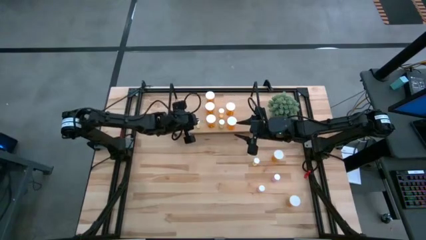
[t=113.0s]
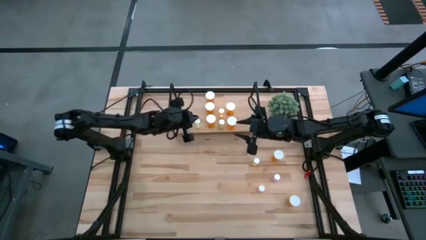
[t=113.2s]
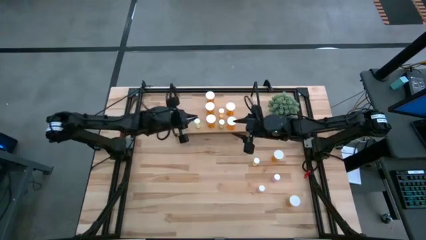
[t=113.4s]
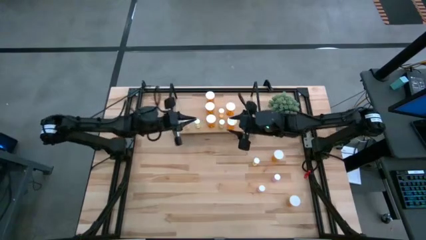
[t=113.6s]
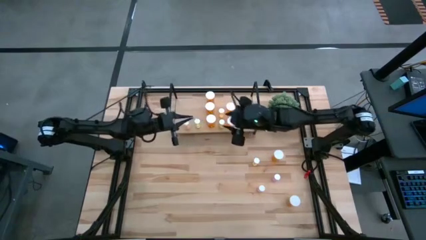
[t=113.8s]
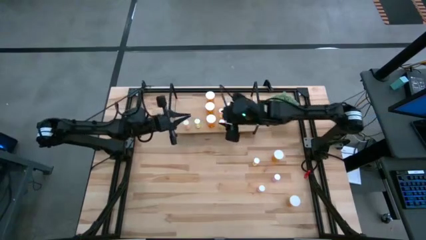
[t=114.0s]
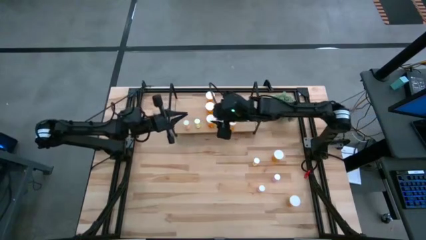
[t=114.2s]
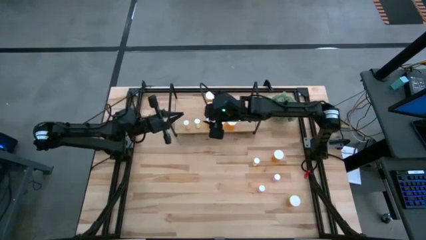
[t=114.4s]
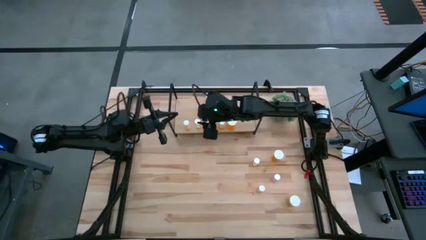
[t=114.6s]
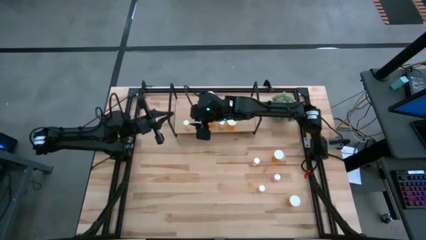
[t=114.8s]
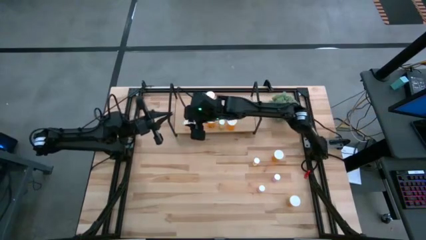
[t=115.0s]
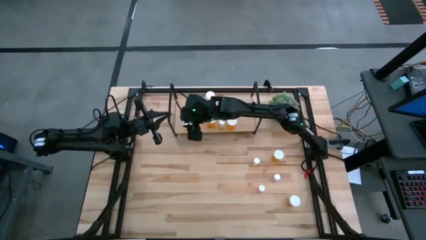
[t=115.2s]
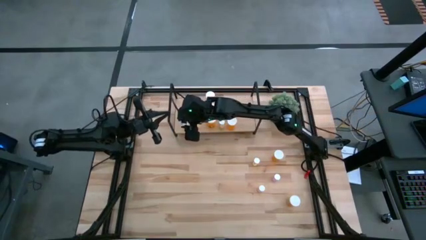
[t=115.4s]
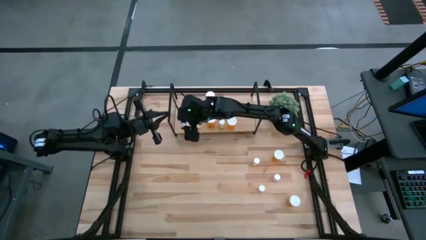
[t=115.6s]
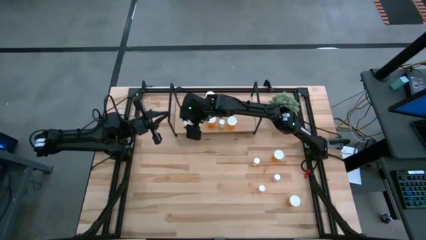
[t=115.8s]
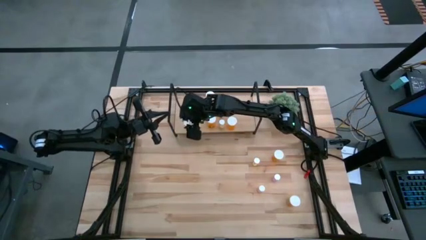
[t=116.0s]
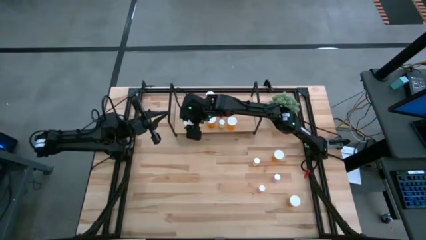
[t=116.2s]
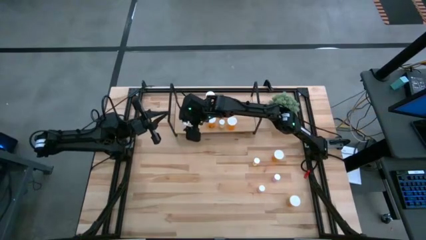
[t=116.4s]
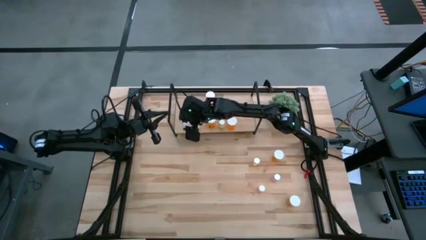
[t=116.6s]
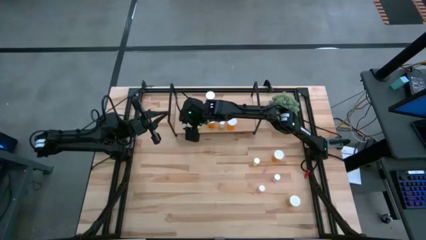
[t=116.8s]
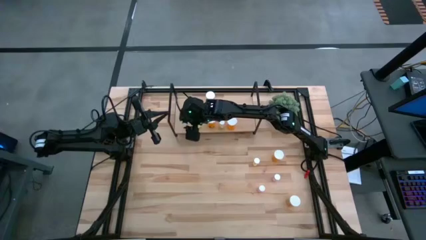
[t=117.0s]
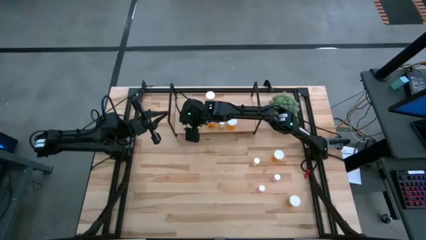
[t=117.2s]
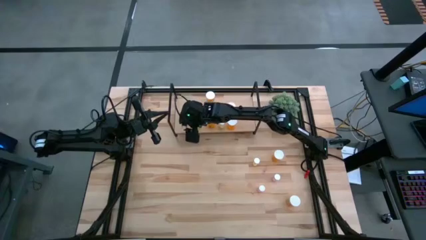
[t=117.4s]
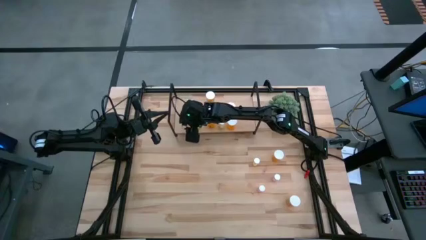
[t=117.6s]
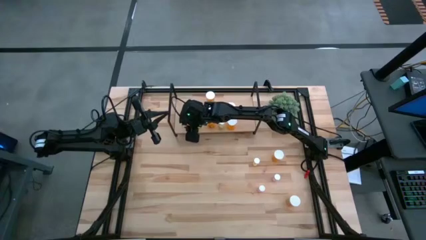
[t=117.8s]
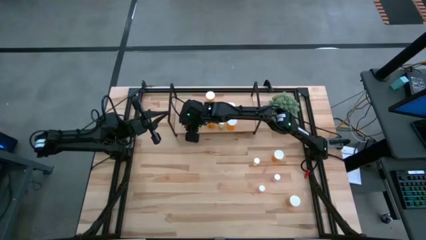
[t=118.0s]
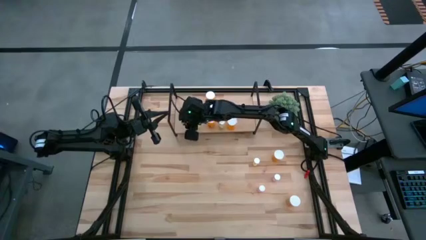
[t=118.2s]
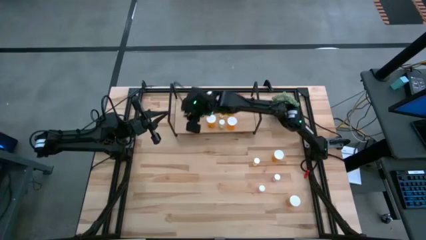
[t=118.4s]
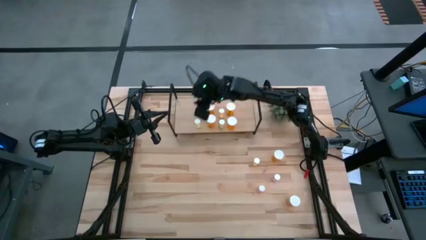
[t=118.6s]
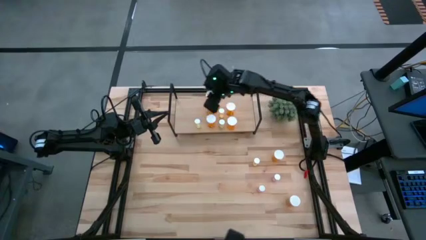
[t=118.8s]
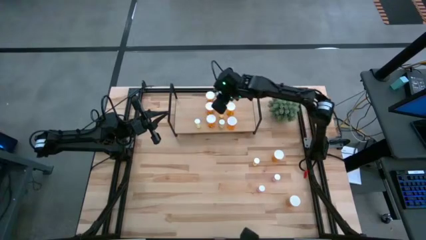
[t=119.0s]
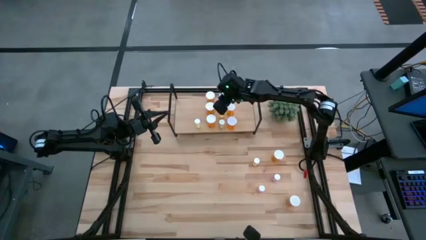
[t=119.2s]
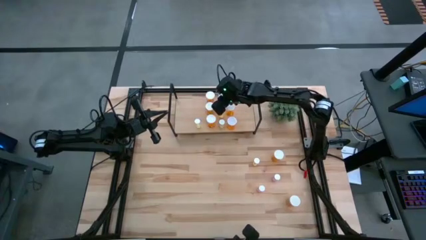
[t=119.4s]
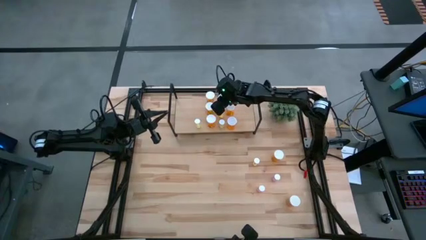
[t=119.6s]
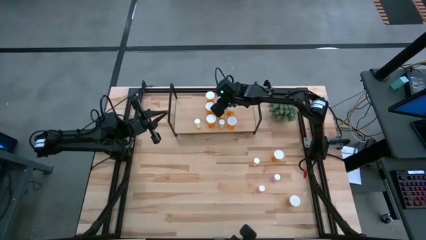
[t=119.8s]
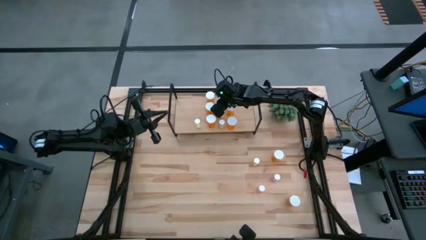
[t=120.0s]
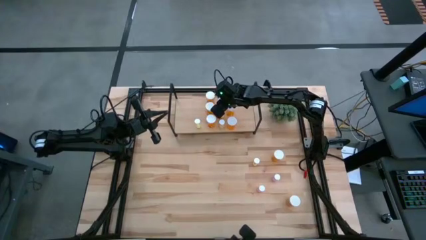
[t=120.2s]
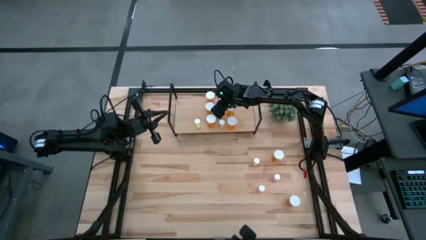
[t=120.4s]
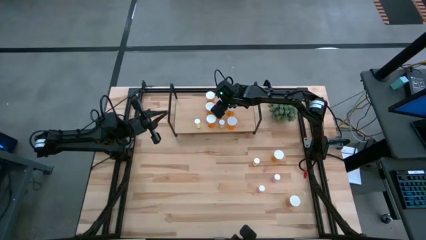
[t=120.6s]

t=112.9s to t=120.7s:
Task: Pick and place medicine bottles onto shelf by color
Move the small yellow pill bottle to the top center on the shelf

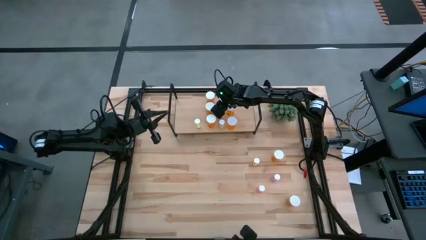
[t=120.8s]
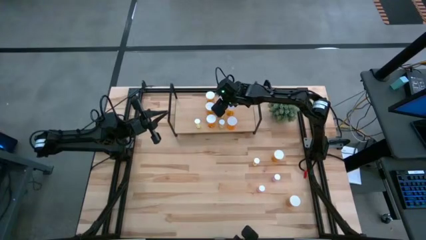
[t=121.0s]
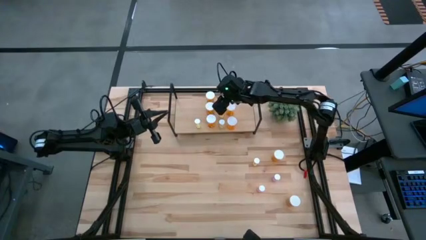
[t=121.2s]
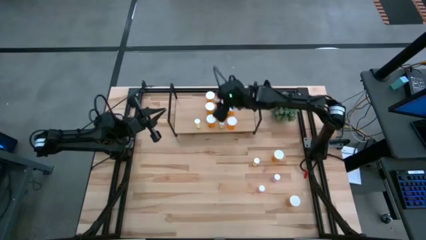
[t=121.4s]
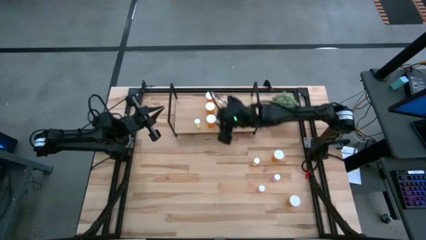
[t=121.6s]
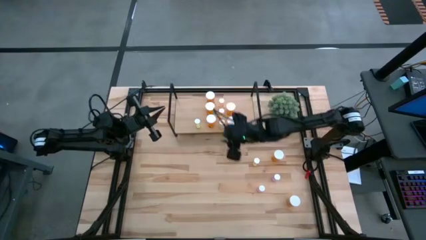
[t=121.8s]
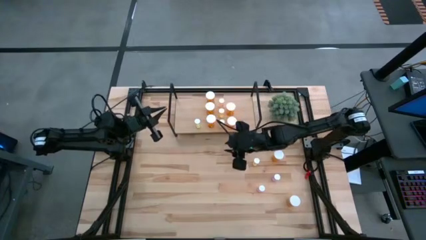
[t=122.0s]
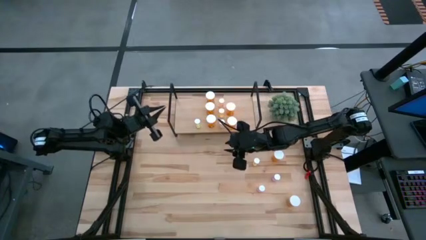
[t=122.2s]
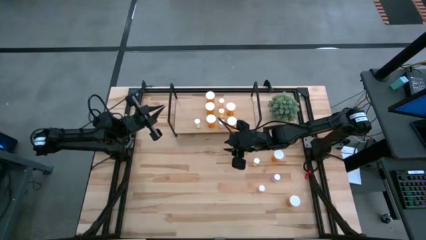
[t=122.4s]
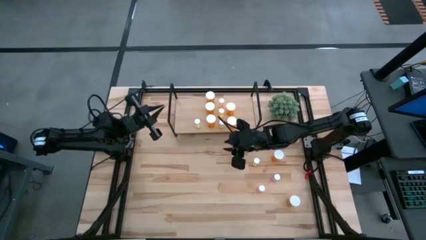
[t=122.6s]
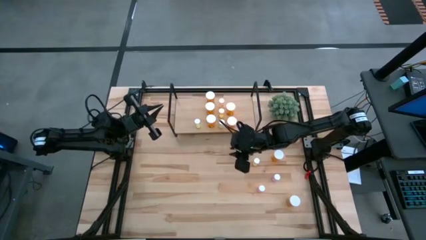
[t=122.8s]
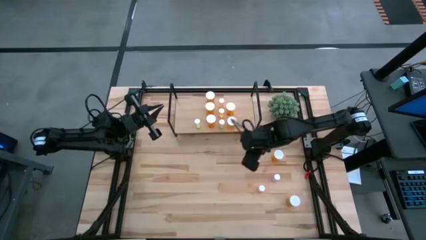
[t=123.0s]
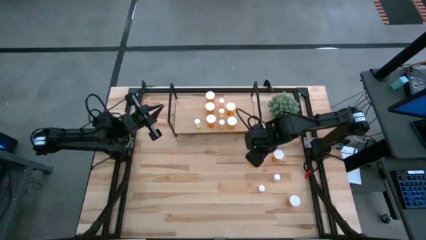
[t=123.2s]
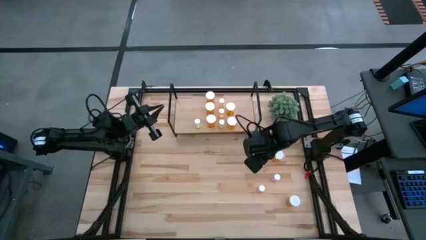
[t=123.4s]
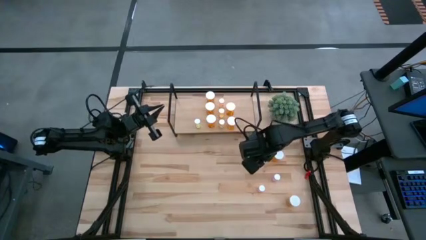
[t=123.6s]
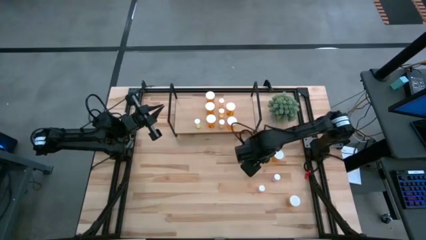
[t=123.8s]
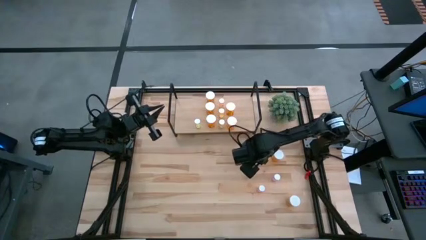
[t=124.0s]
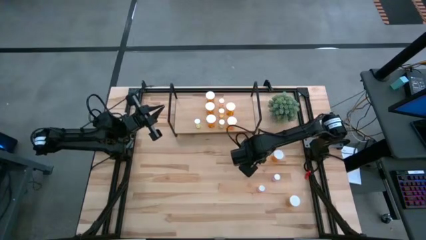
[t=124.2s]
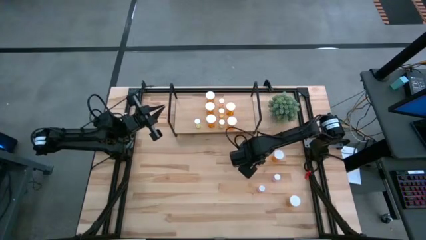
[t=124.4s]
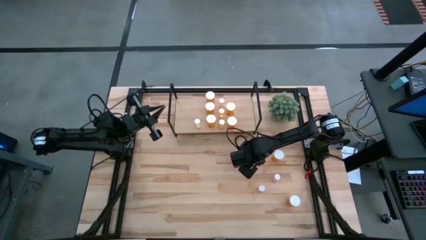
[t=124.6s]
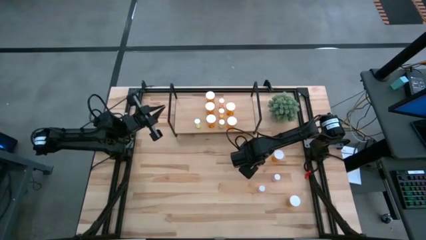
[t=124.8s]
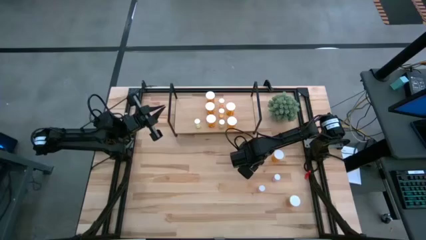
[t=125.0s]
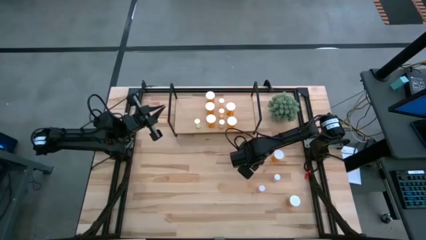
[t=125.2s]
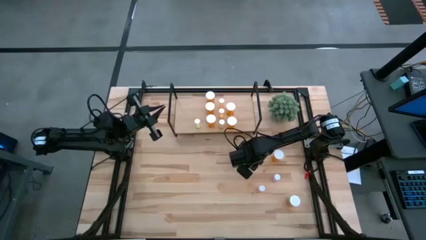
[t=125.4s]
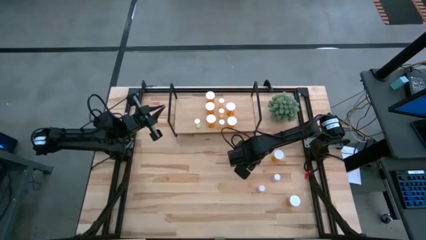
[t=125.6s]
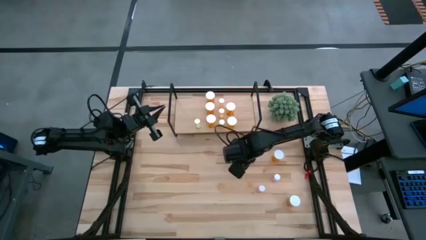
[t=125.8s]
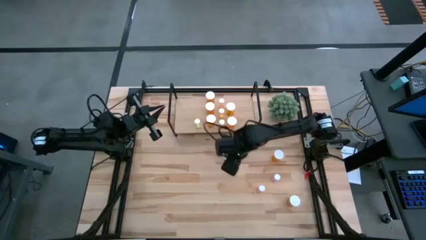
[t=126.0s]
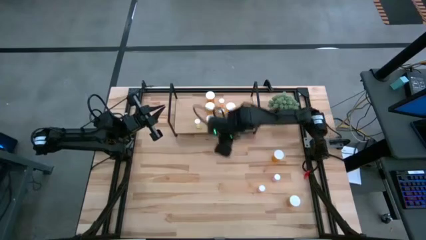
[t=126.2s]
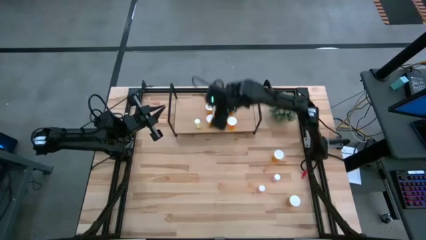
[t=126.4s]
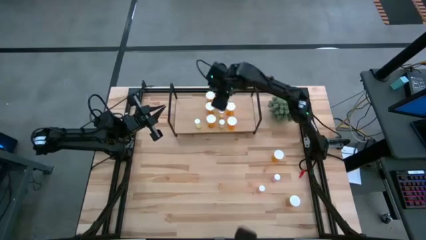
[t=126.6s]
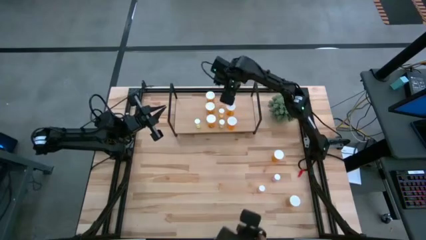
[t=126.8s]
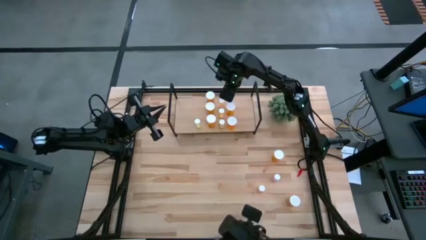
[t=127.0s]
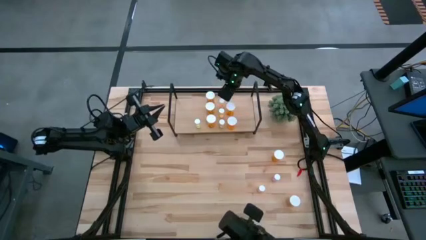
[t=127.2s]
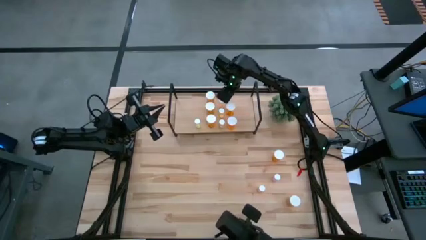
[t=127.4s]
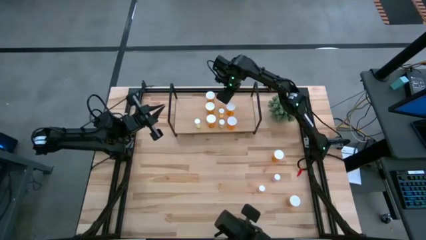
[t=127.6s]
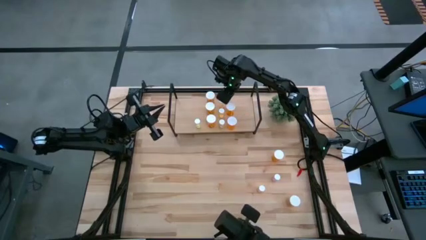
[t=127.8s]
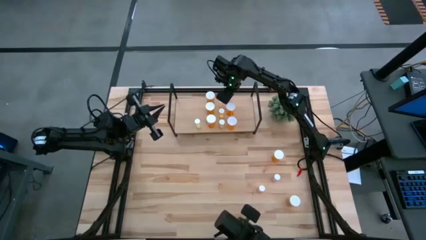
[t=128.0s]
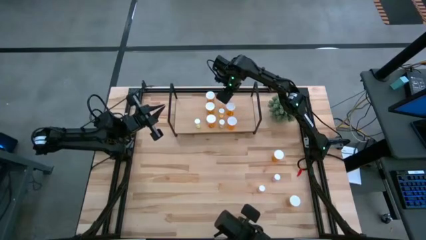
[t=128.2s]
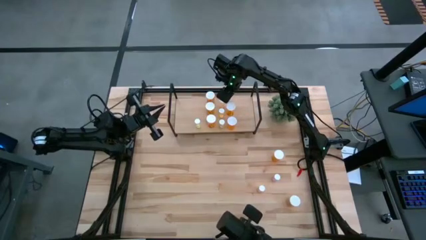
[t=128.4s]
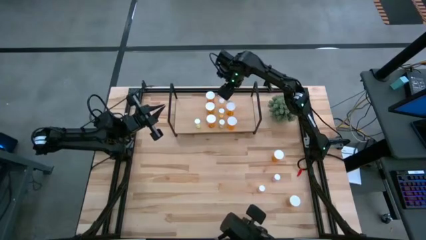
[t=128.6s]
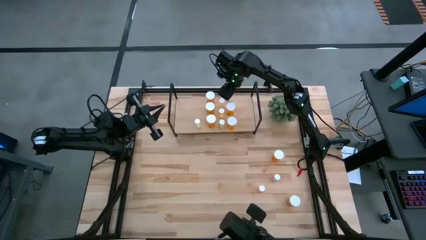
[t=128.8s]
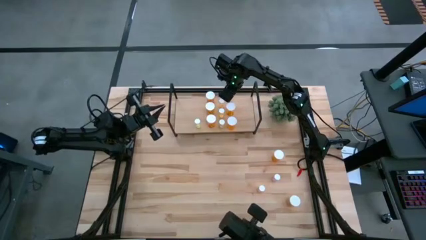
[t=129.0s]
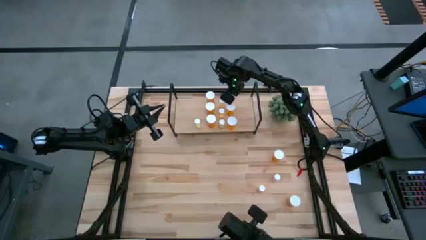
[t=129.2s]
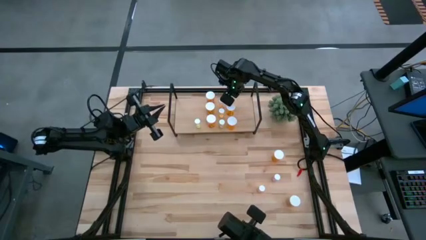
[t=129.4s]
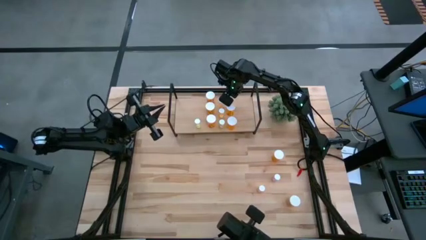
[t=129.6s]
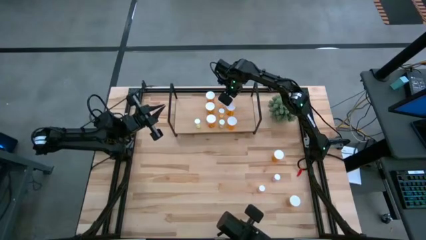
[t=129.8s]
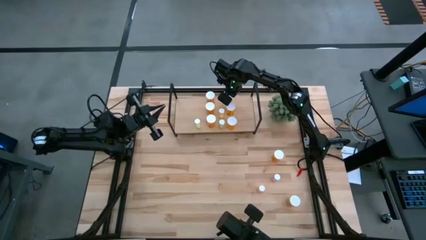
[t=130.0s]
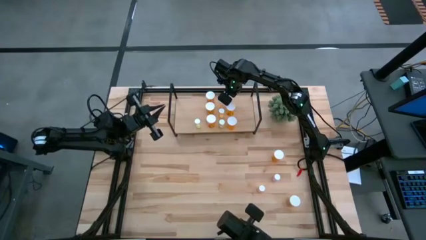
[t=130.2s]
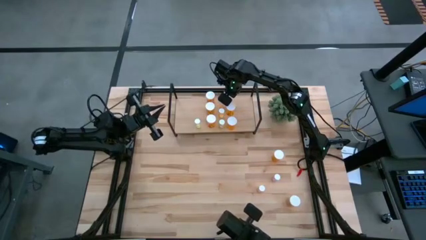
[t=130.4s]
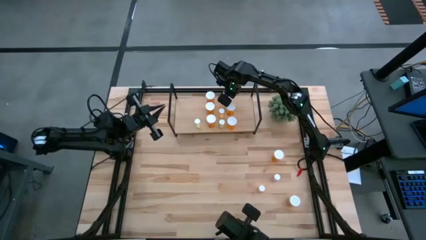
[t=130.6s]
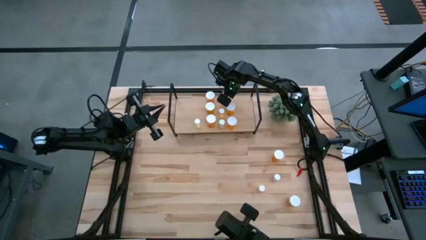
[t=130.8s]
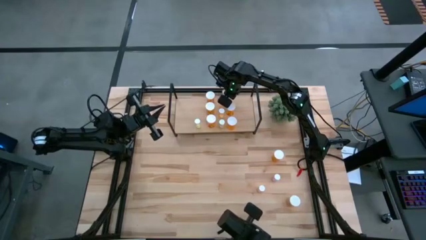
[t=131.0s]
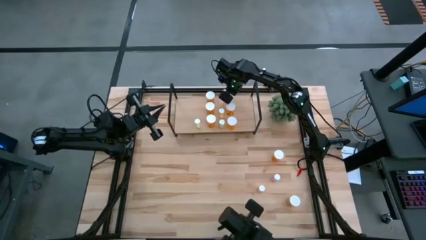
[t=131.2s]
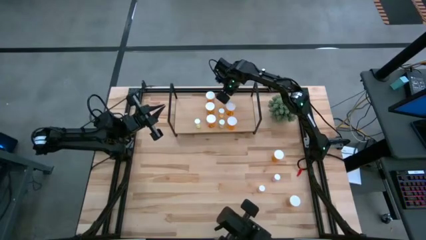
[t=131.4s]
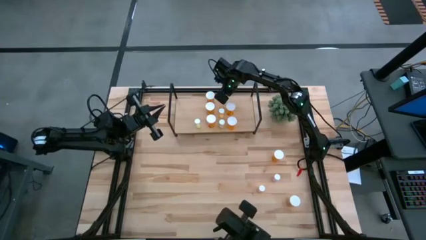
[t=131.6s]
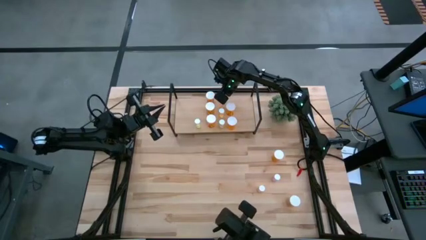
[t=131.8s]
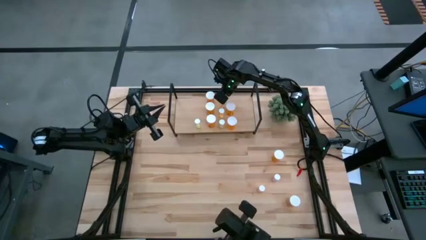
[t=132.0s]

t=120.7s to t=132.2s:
Put the small yellow pill bottle on the shelf aligned with the other small yellow pill bottle
